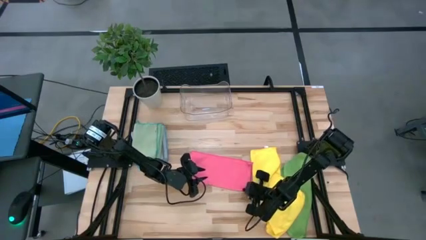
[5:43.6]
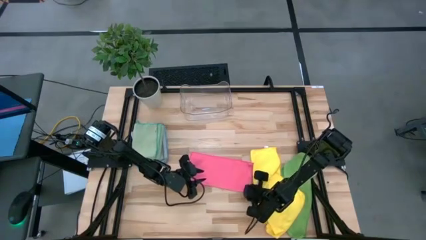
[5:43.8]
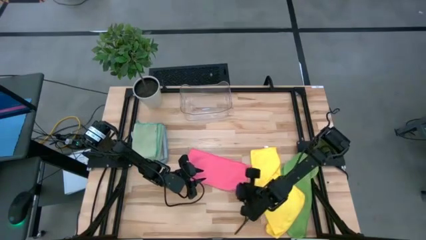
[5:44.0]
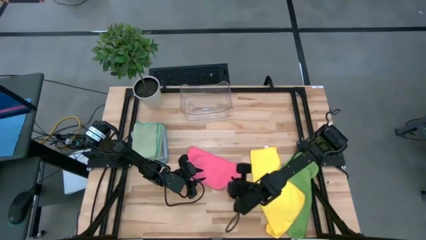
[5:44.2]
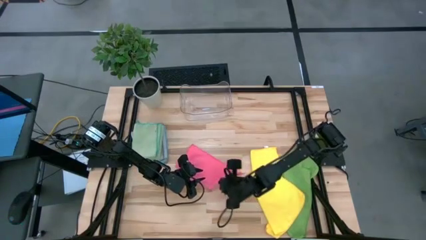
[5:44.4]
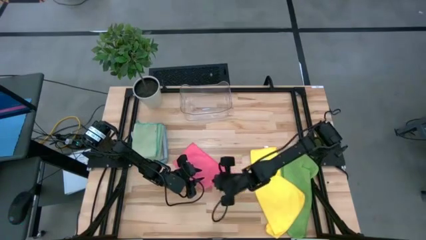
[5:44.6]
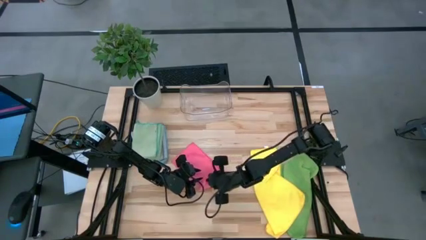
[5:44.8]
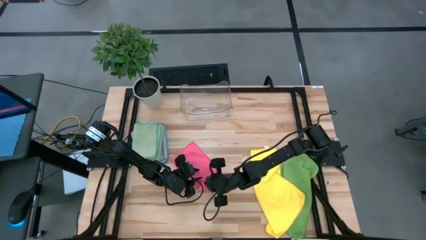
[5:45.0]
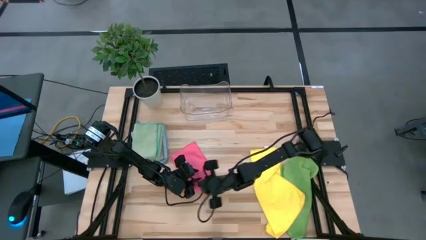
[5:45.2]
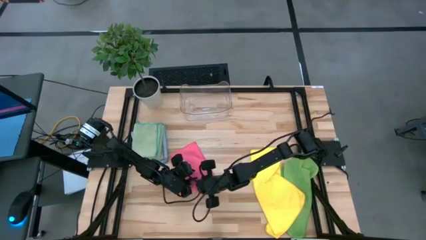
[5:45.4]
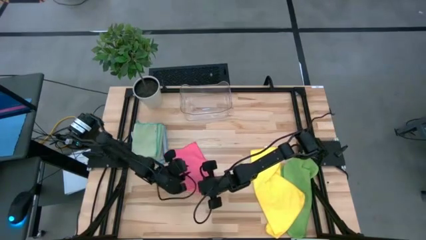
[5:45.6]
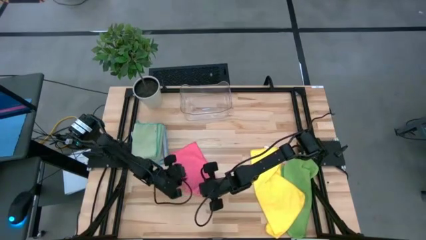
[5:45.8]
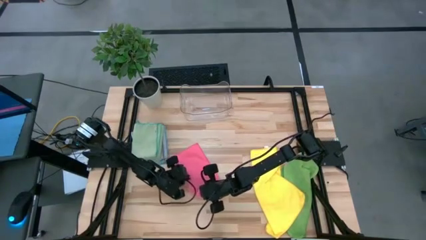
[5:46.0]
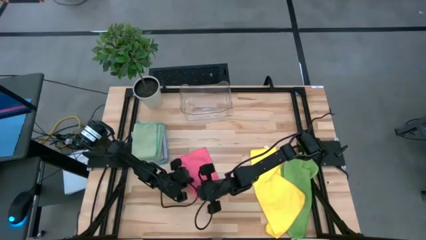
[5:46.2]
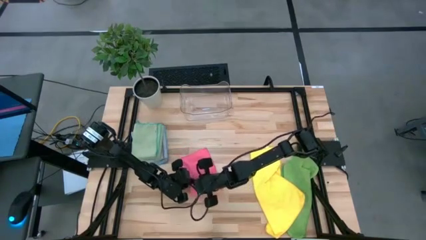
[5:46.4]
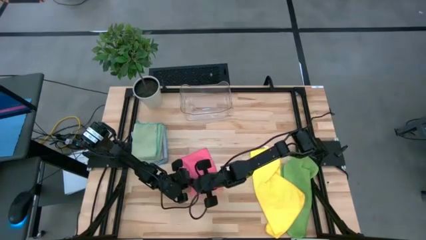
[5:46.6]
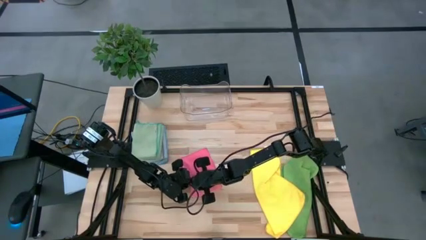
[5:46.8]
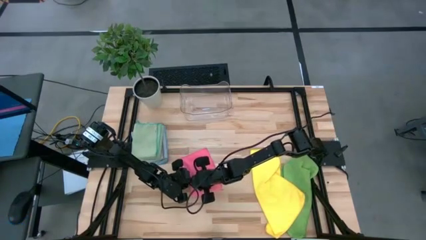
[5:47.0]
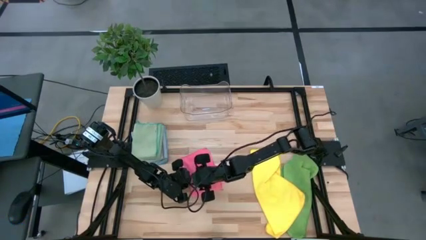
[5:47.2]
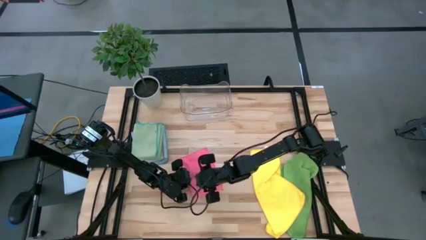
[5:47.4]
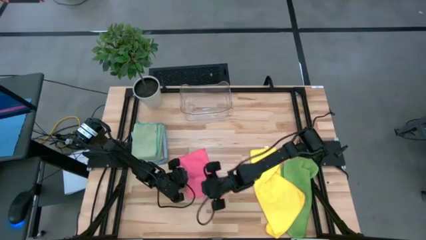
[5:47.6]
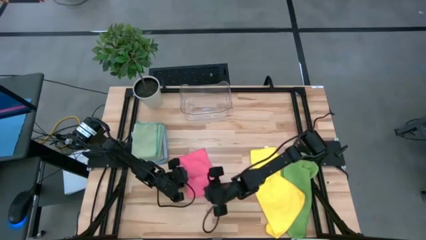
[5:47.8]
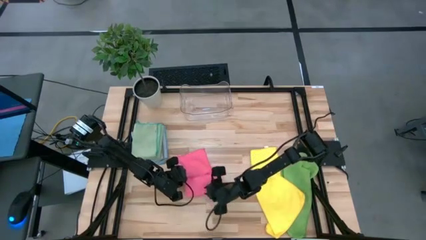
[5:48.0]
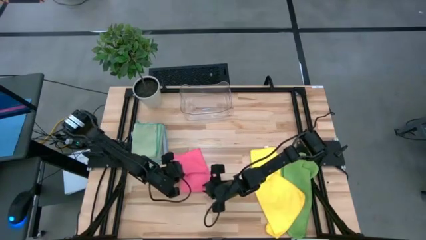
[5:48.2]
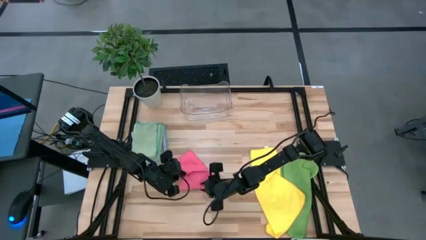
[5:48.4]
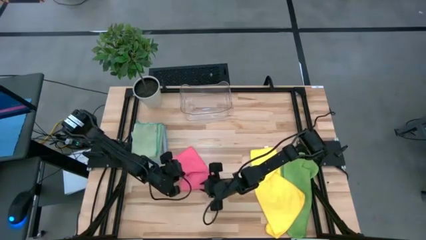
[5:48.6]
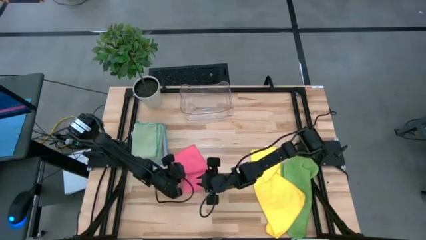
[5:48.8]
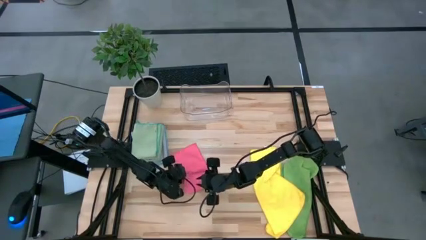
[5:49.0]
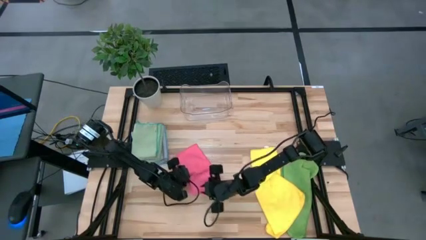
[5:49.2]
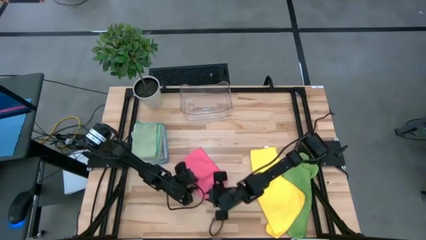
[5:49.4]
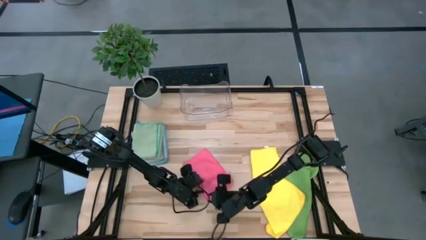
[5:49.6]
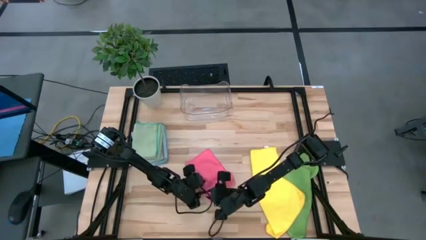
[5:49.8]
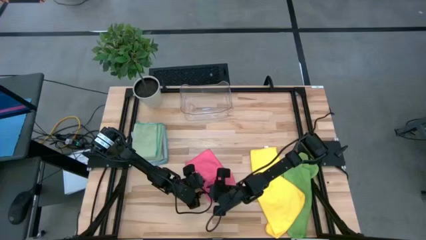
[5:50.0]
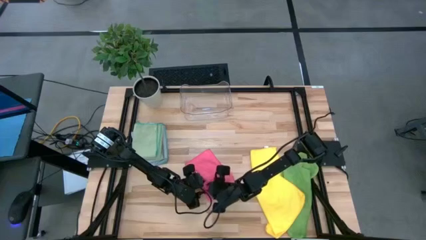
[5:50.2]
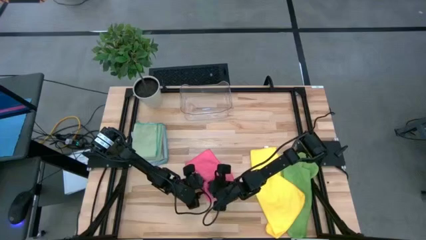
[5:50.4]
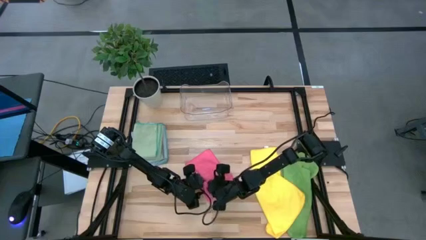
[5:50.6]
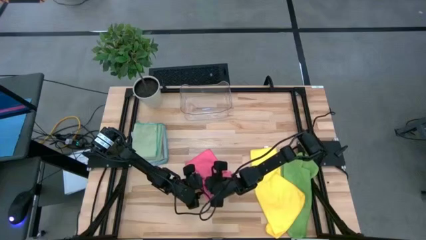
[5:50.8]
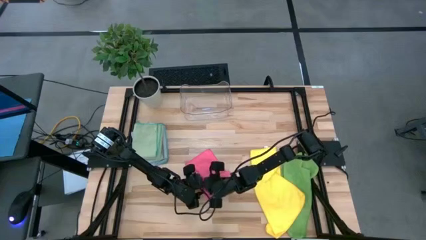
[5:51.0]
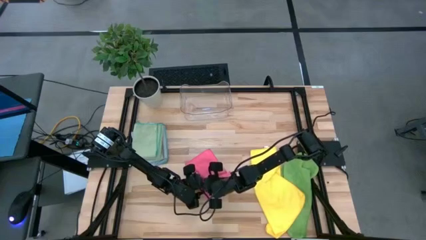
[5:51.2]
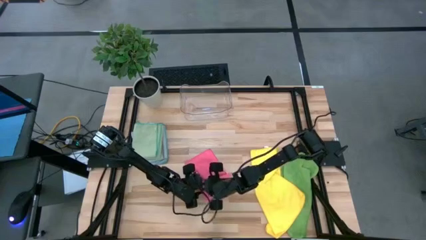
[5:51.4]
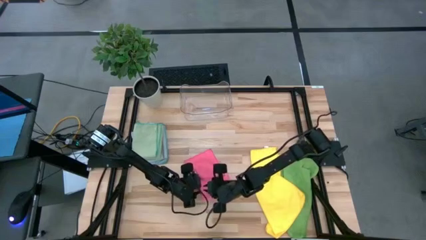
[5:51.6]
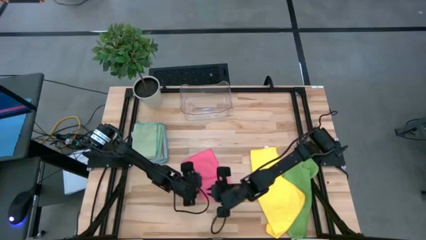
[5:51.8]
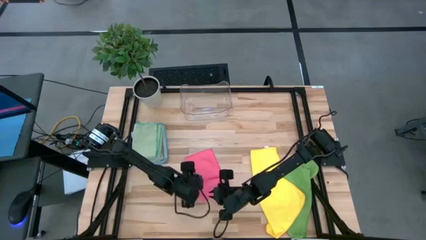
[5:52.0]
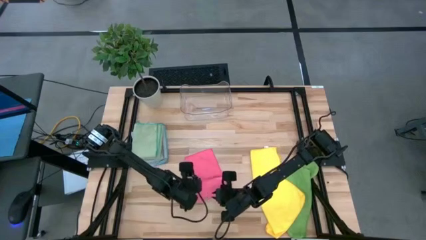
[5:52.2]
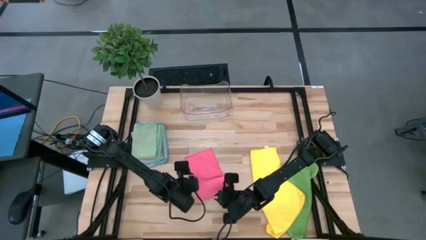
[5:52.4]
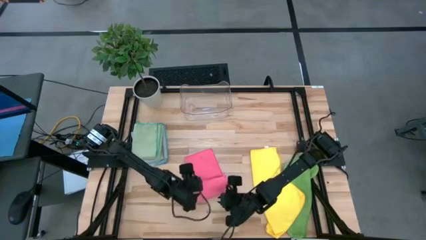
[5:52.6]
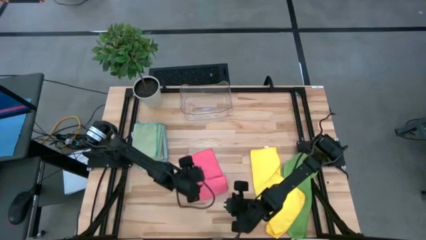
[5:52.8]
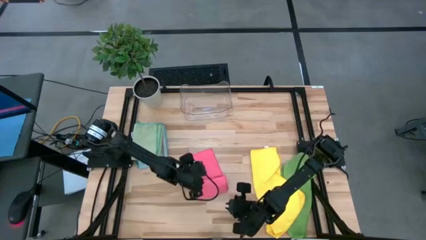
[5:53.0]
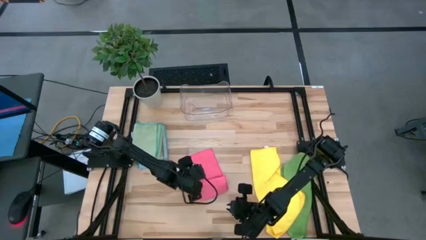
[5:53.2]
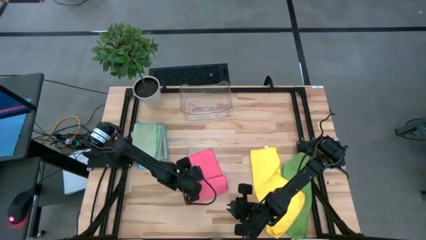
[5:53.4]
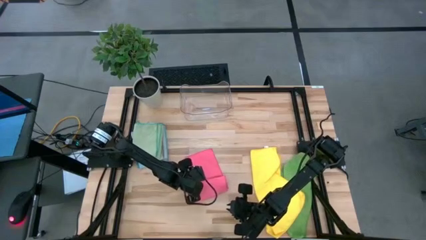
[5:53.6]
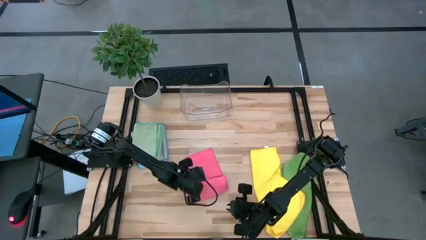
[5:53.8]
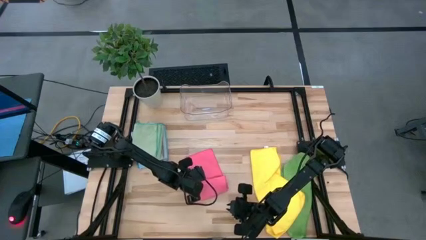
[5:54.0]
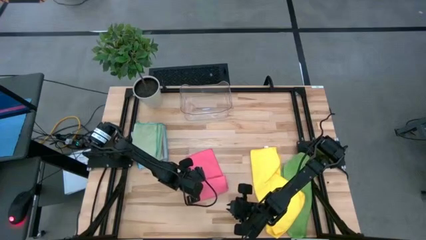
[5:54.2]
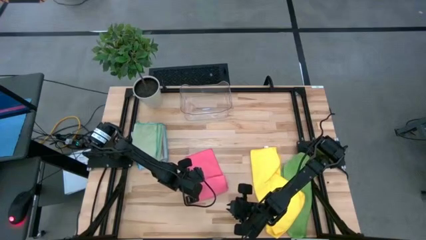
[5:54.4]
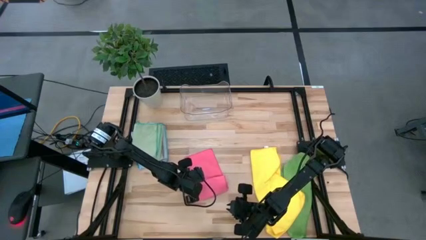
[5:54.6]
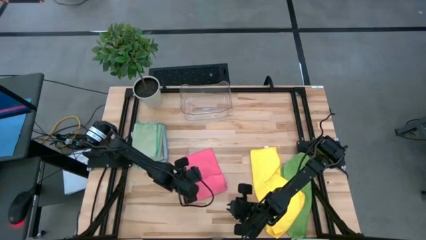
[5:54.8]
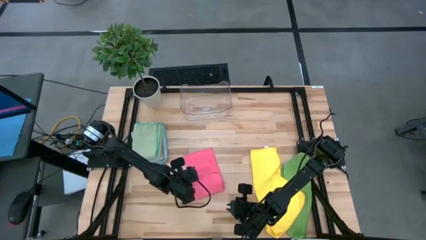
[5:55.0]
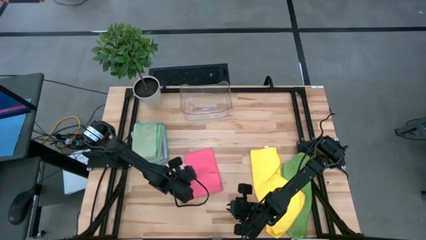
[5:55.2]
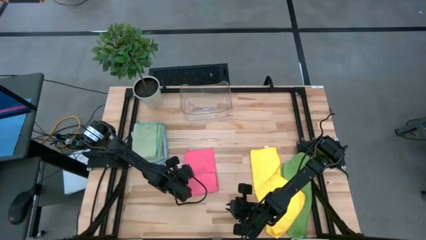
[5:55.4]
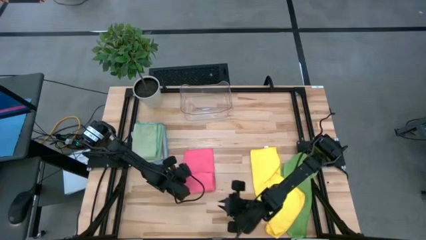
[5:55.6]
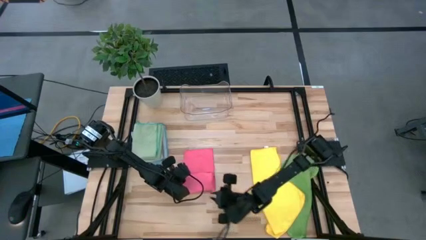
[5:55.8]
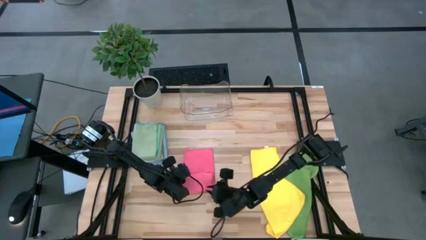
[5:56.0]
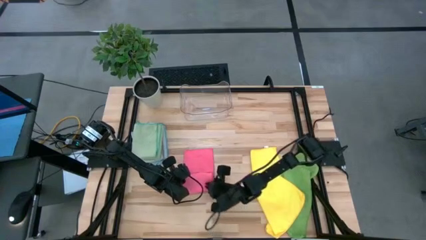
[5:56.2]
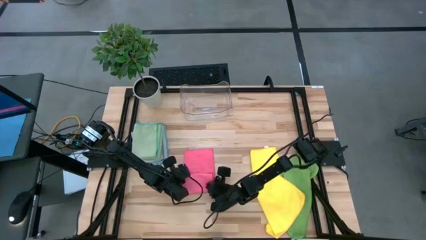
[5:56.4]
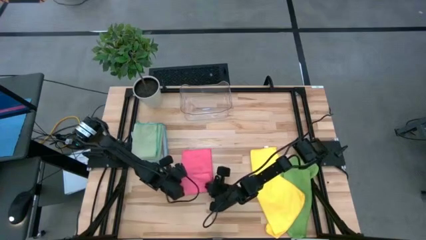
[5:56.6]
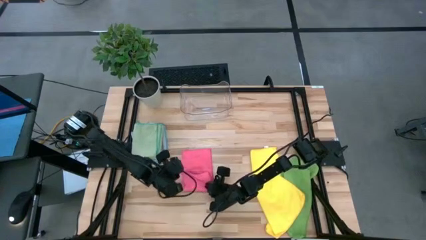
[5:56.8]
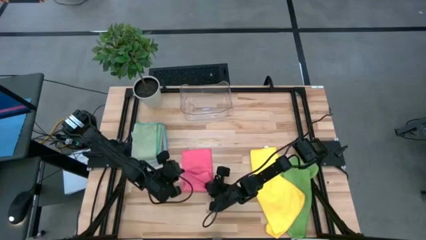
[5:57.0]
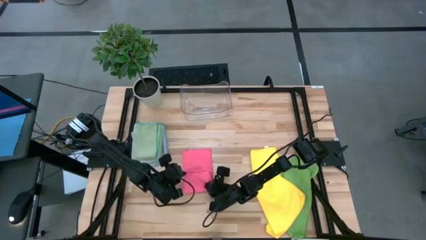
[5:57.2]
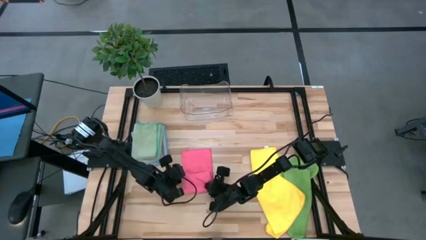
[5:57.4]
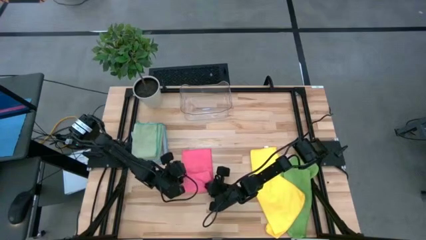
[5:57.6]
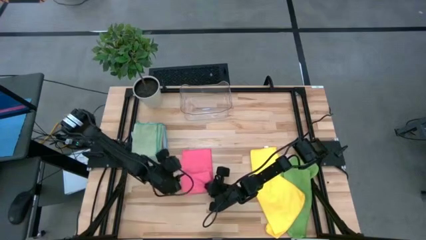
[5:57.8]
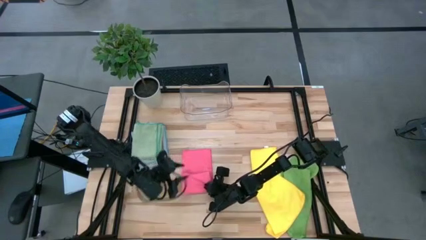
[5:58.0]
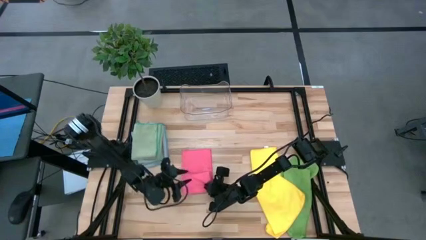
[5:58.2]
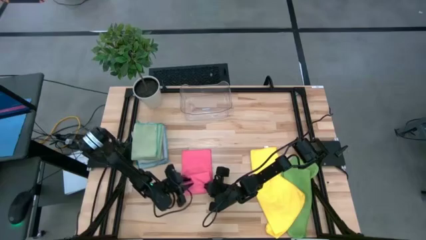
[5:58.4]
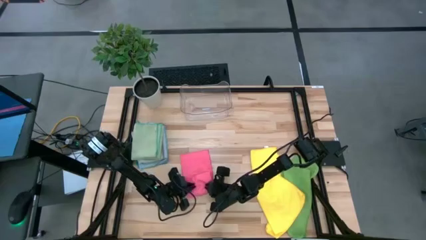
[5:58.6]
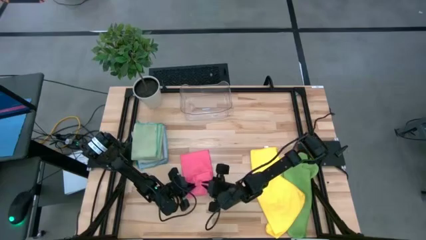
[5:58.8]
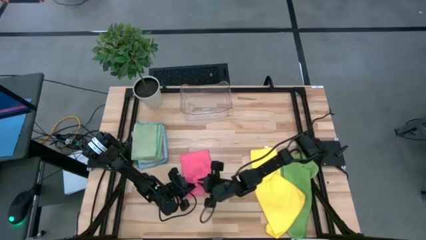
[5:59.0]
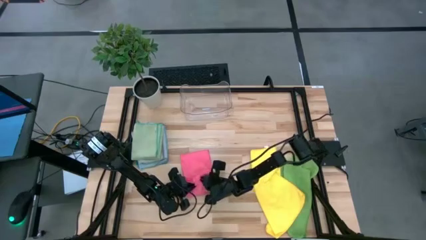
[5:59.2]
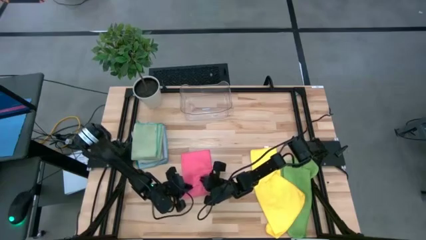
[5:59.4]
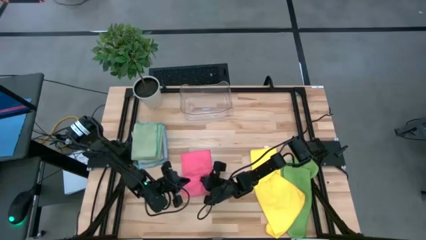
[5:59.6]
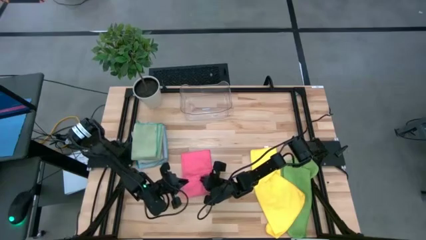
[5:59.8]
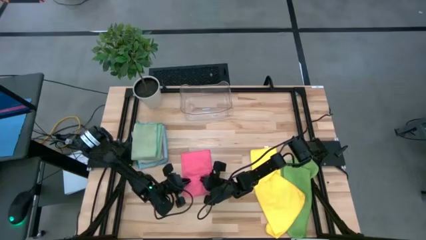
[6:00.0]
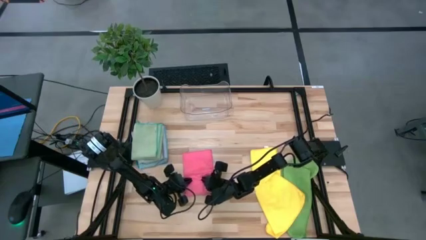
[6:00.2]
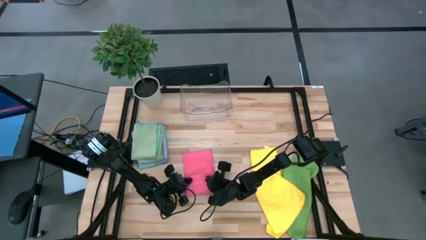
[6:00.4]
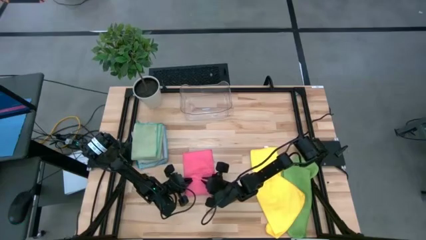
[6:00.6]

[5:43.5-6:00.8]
Task: Fold microfiber towels
Fold the pink microfiber cloth
